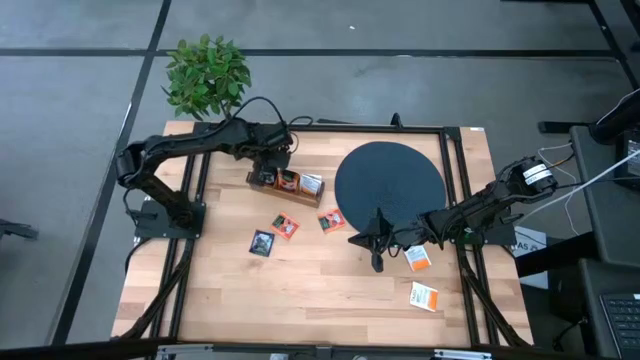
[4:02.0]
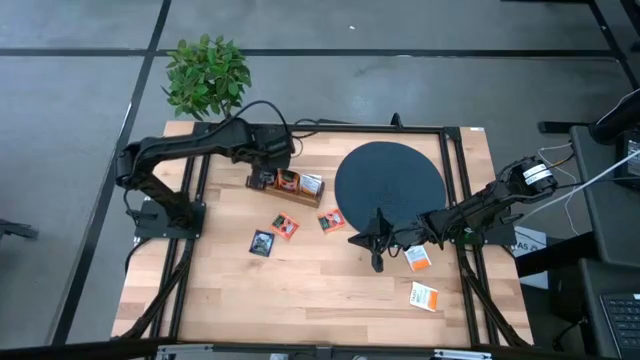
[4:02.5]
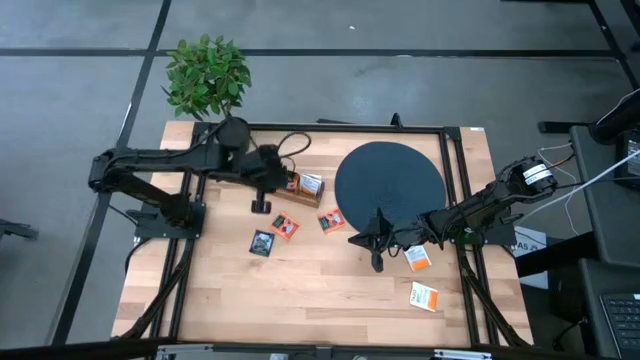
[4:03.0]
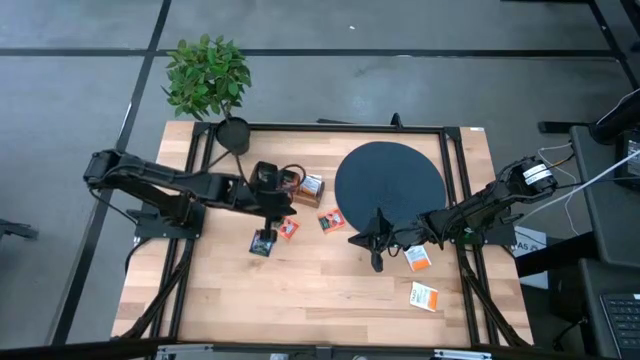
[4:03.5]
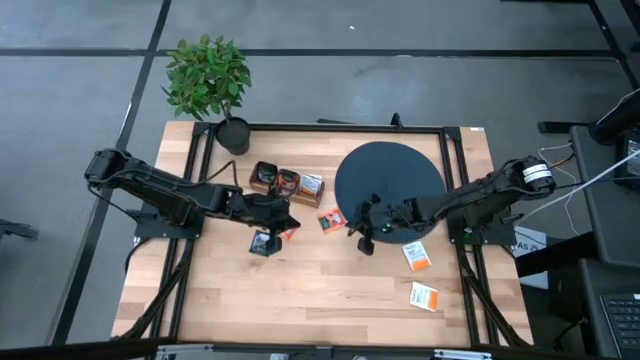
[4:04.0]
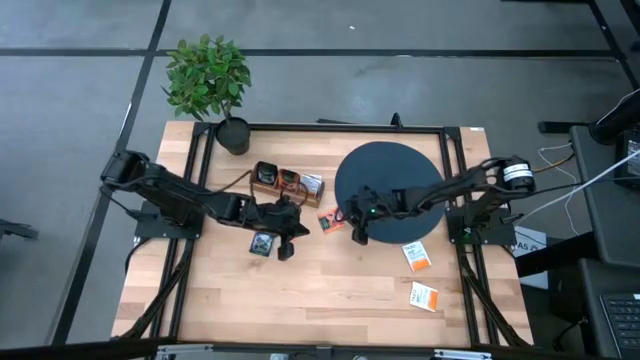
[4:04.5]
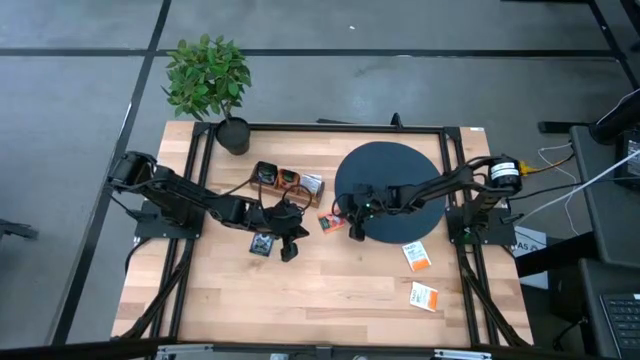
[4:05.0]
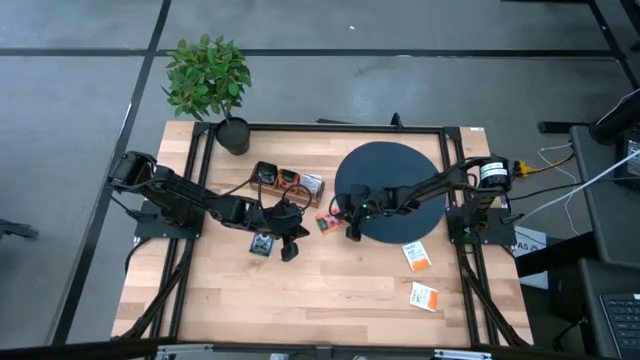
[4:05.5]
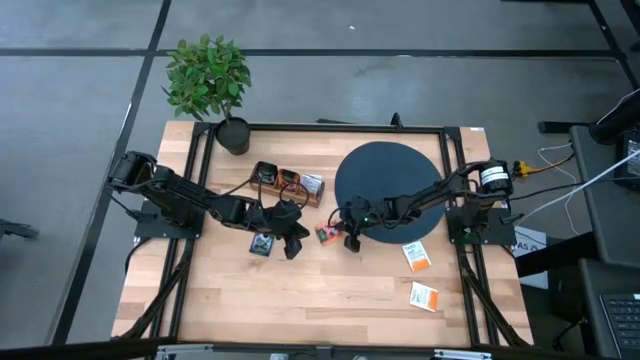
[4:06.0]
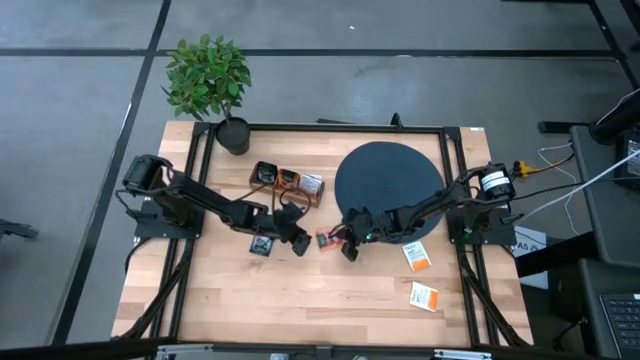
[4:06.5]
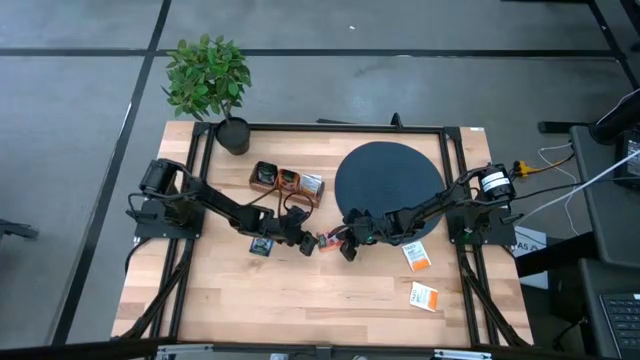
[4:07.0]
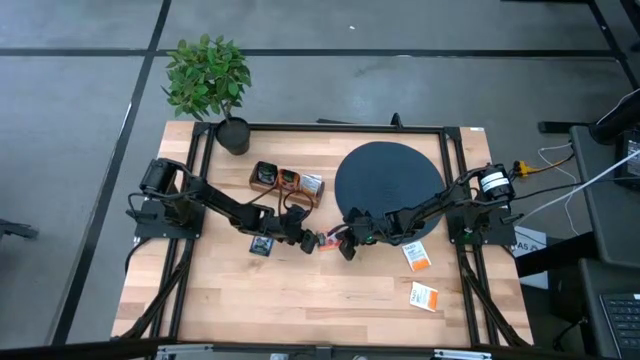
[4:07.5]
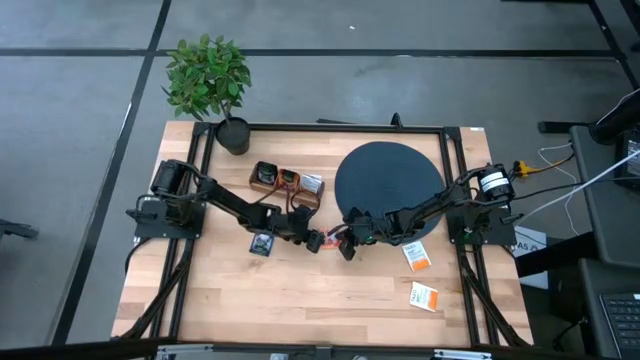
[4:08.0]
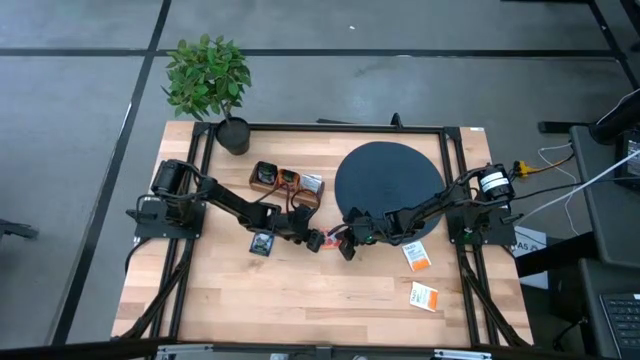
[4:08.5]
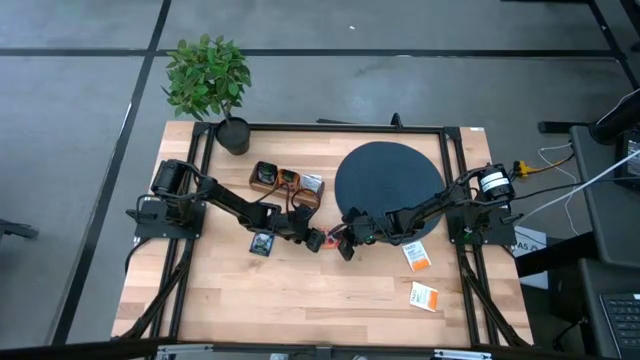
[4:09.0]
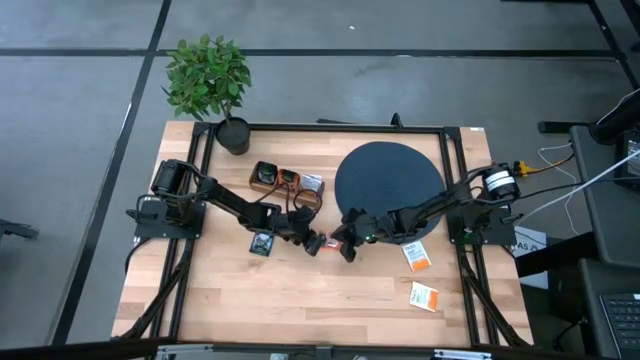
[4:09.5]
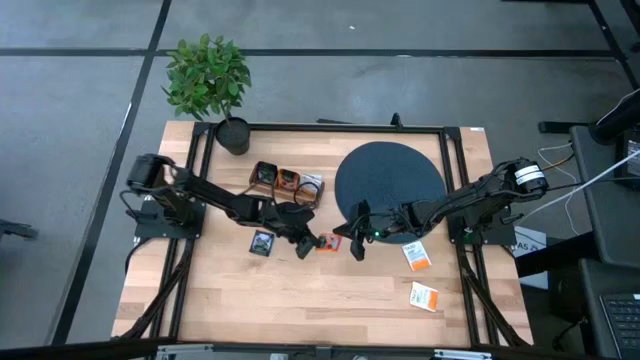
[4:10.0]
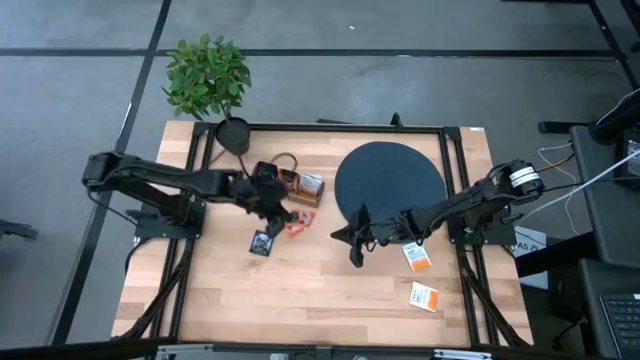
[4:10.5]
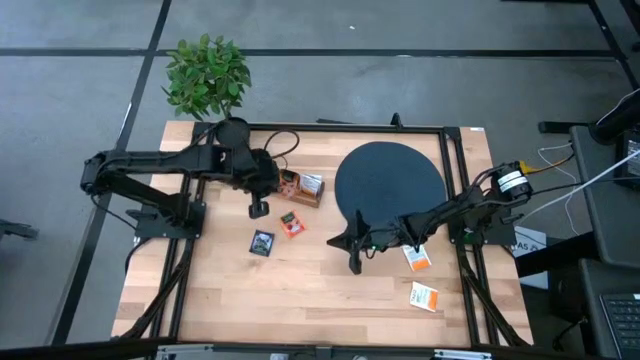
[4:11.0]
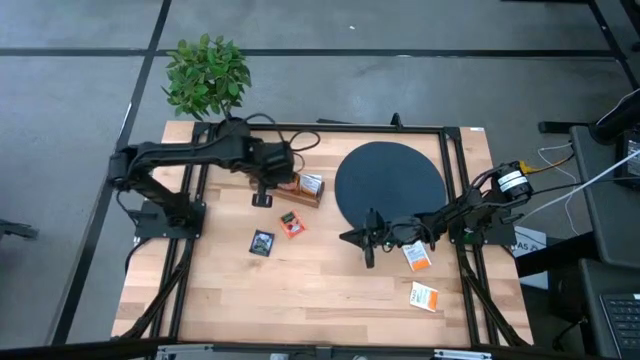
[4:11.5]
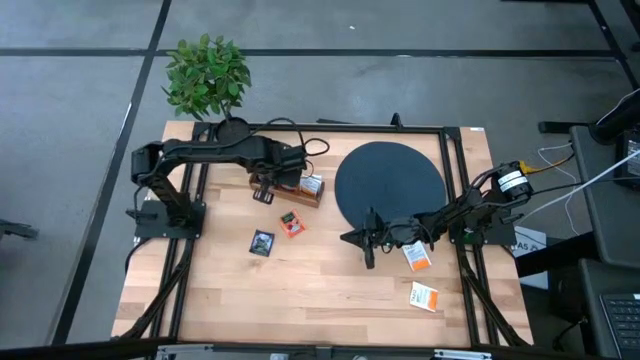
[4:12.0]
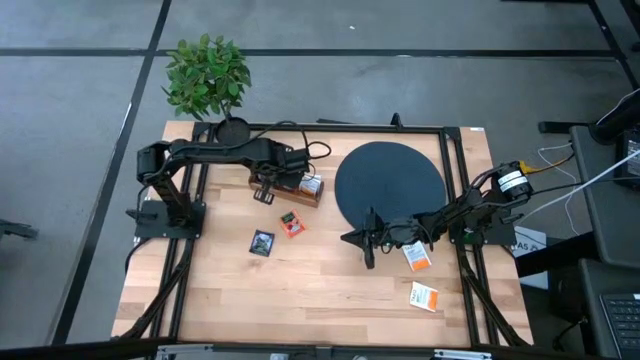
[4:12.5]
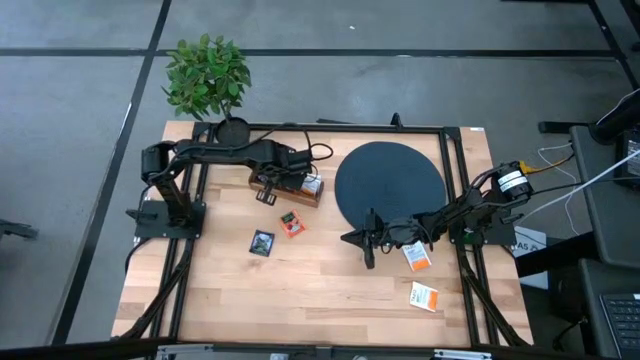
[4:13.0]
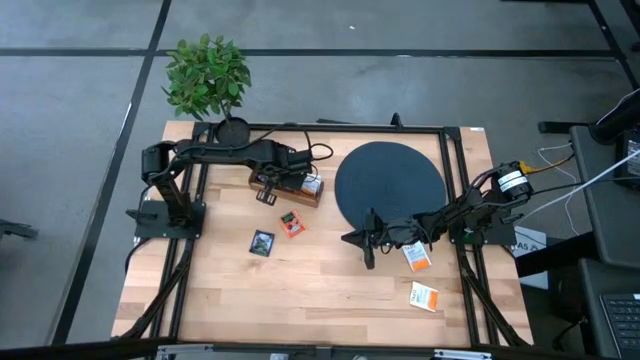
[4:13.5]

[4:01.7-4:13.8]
Task: Pick & Place Tea
Put the right orange tea bag into the middle section of the wooden organizer

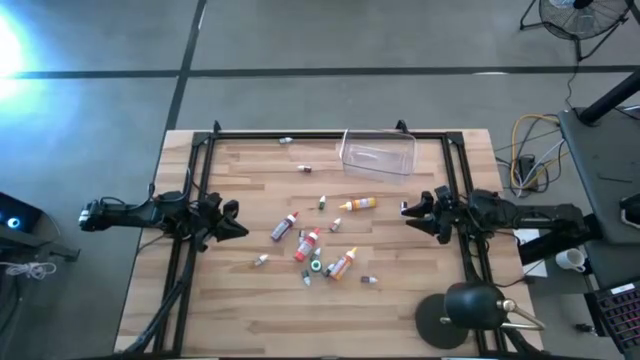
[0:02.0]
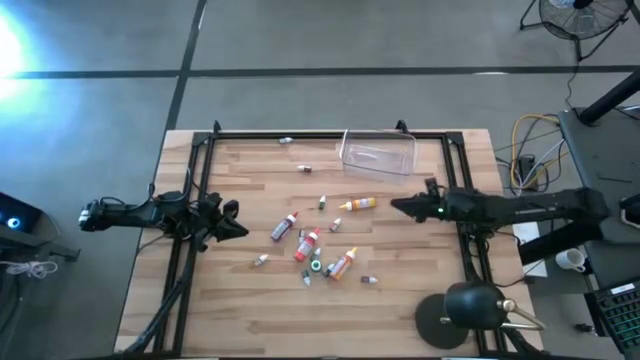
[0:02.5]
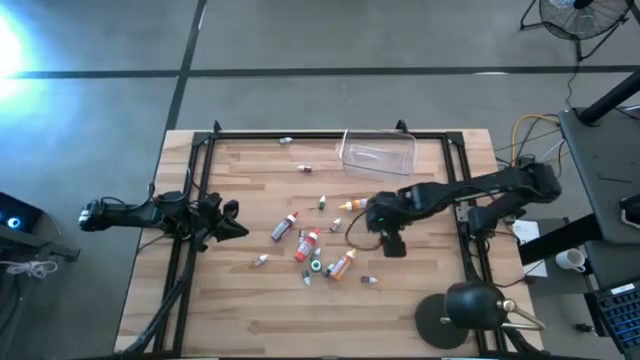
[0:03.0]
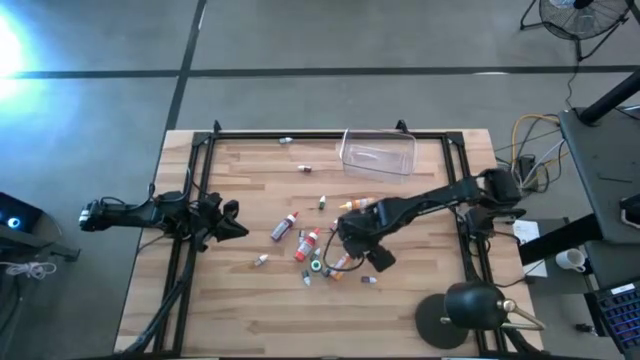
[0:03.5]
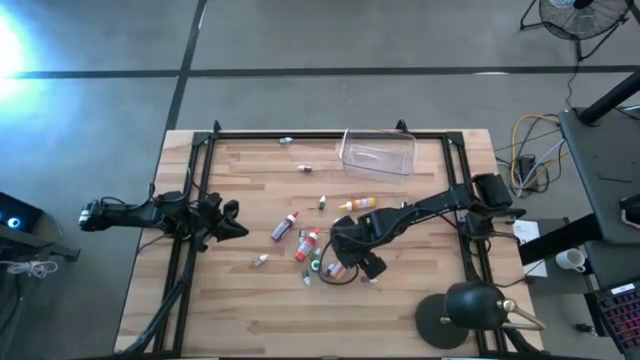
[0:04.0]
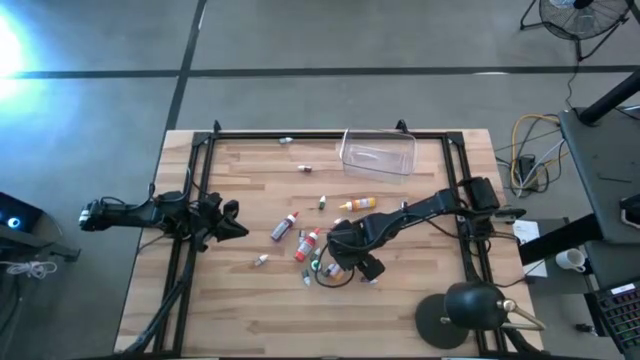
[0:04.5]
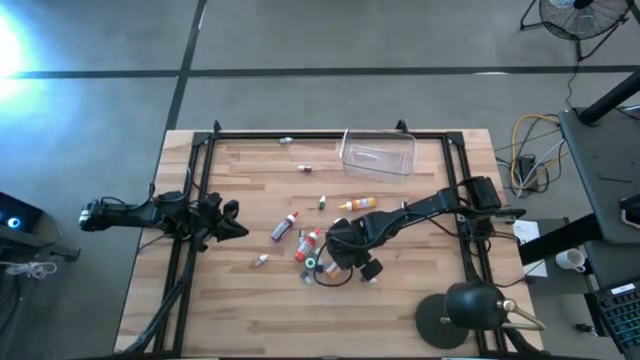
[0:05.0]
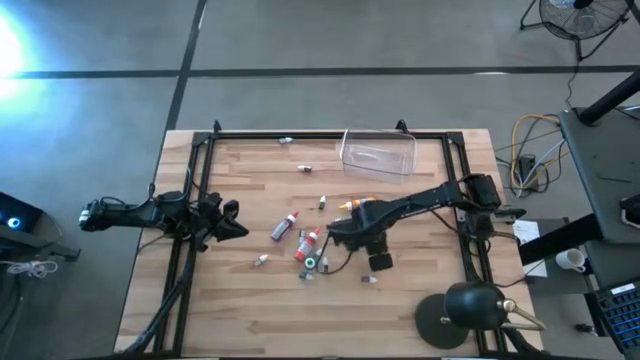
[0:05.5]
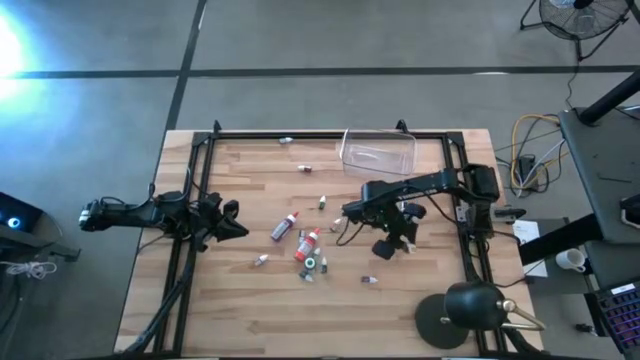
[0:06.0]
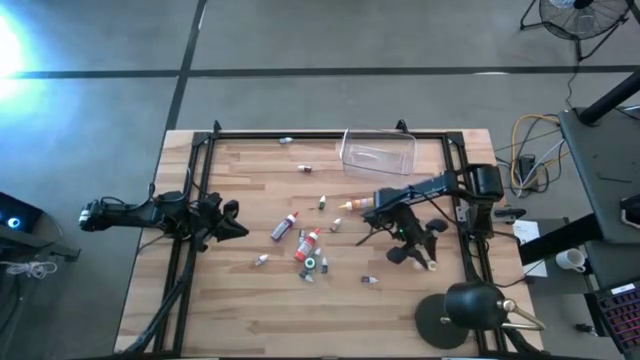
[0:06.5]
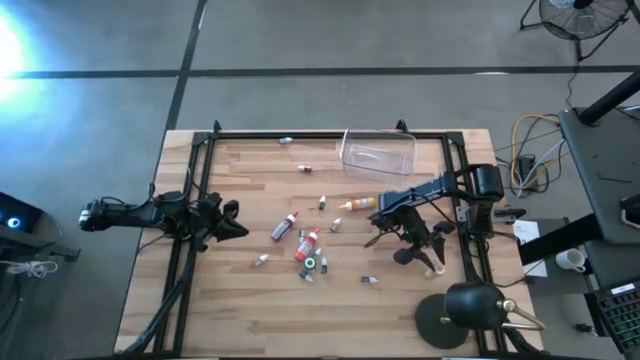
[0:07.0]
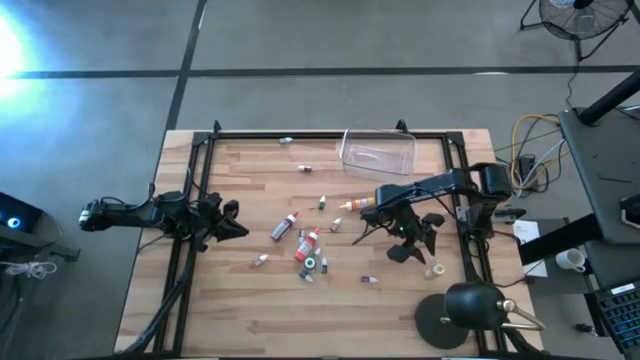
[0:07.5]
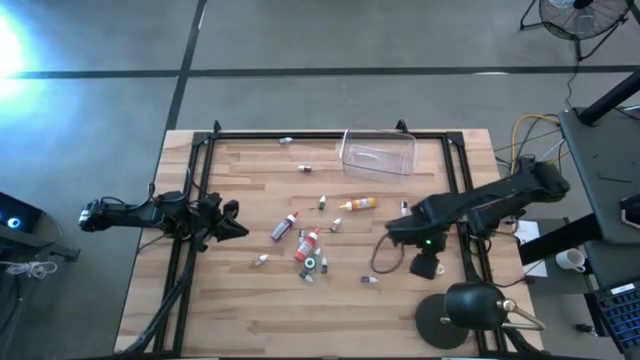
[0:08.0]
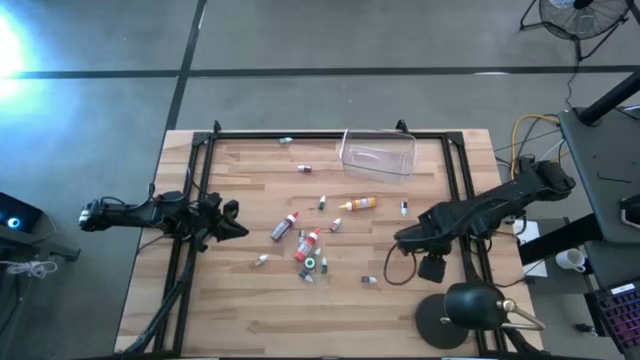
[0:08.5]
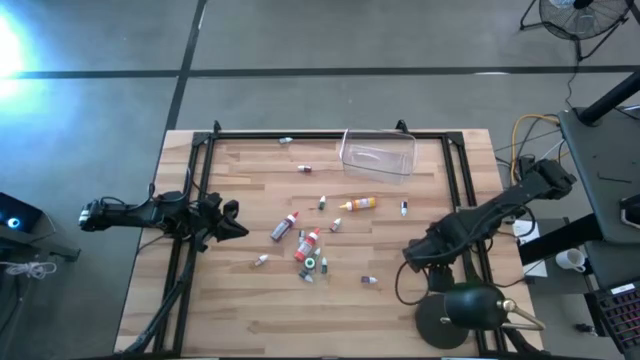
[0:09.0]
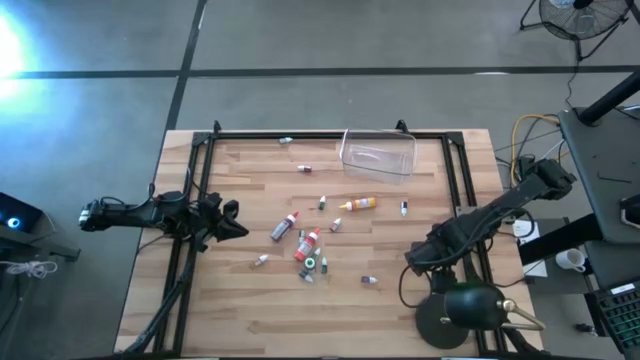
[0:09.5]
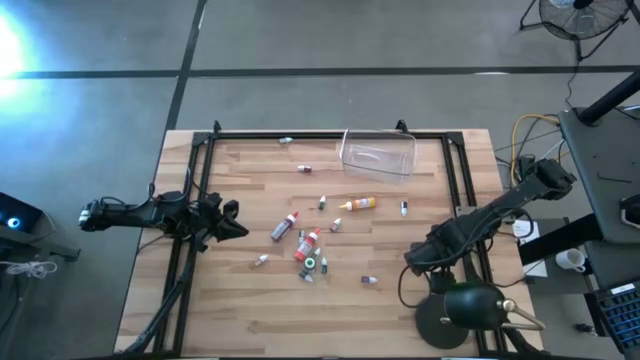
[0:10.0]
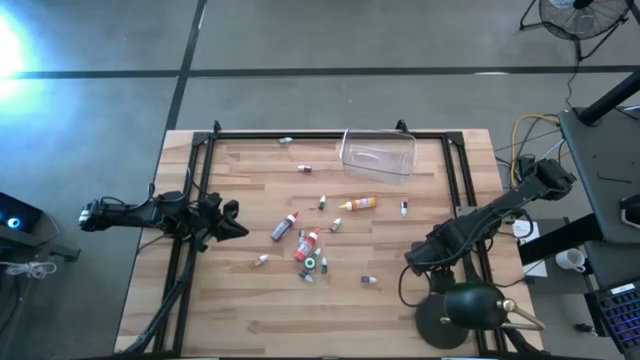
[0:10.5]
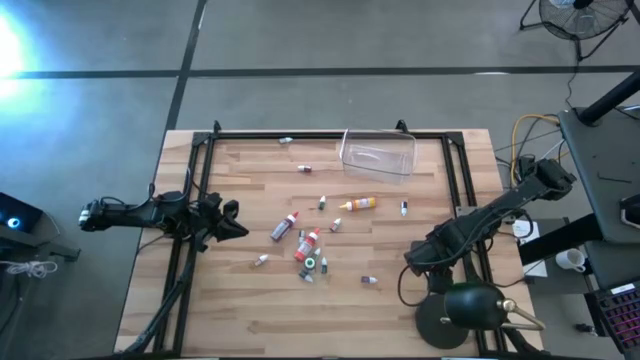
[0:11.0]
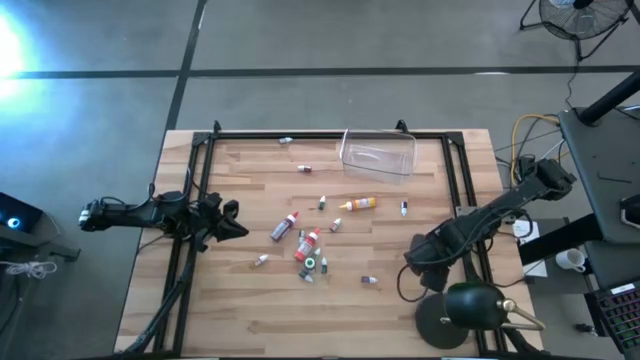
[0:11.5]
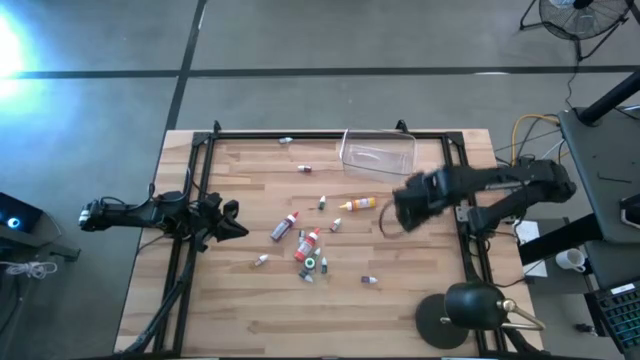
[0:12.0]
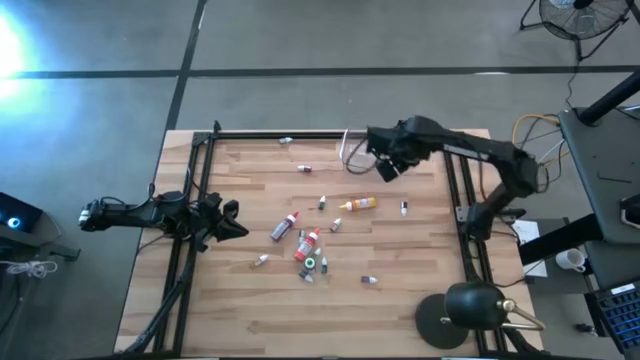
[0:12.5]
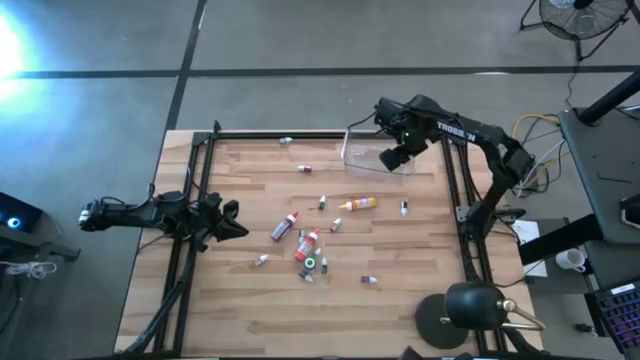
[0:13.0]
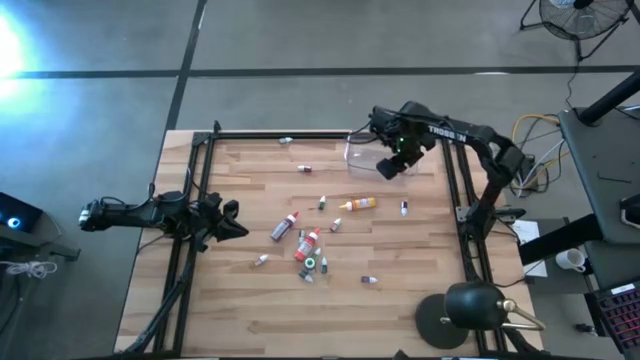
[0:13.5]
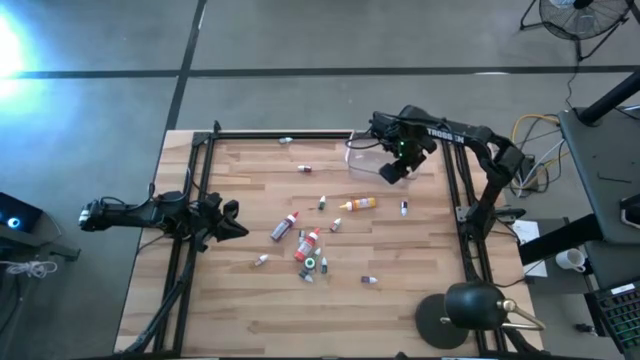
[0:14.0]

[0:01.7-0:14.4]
Task: Pick & Place food coloring
Put the large yellow food coloring bottle into the transparent bin
